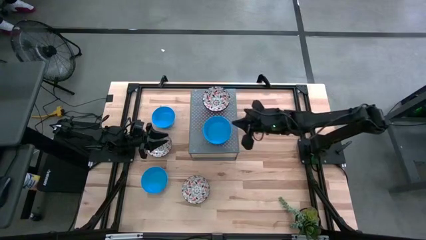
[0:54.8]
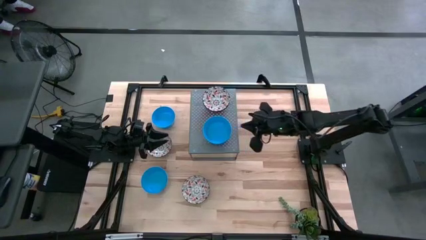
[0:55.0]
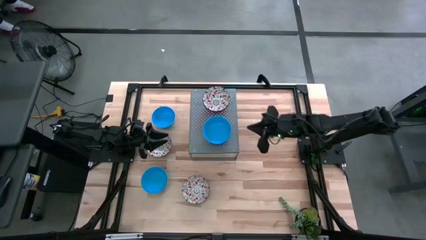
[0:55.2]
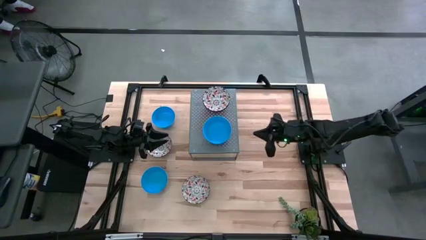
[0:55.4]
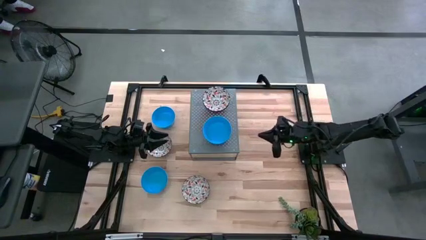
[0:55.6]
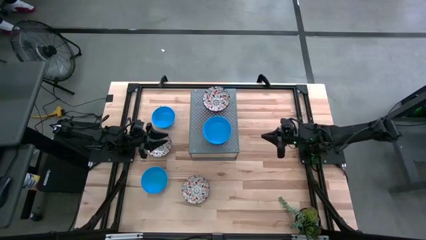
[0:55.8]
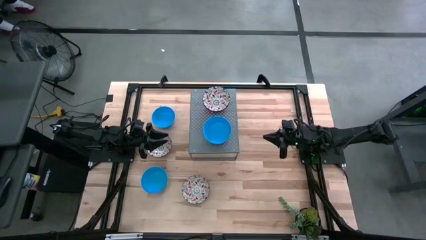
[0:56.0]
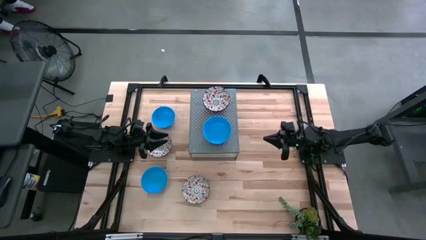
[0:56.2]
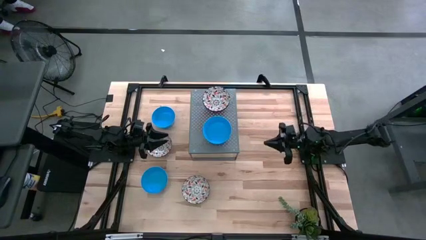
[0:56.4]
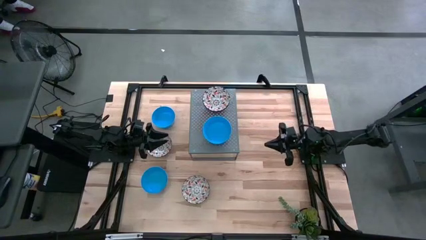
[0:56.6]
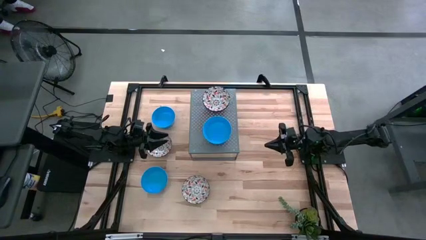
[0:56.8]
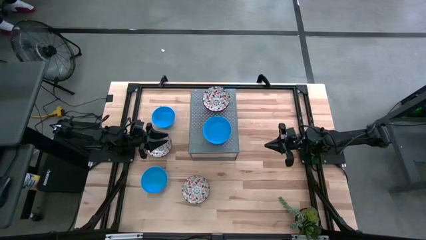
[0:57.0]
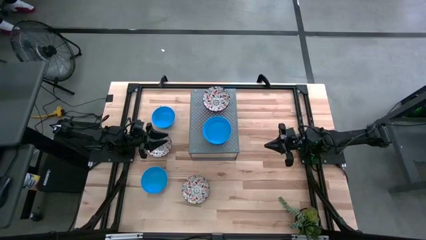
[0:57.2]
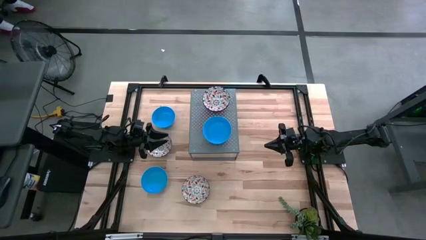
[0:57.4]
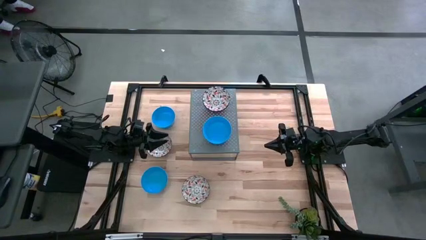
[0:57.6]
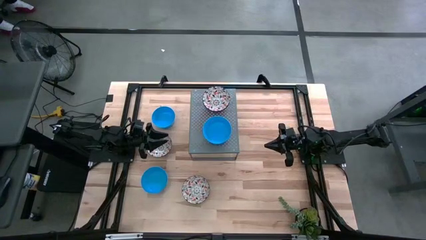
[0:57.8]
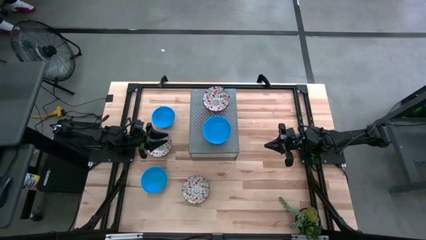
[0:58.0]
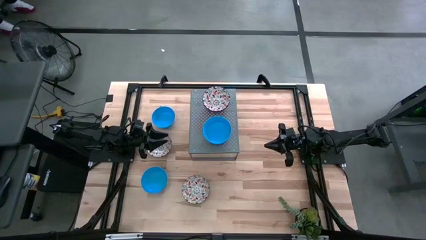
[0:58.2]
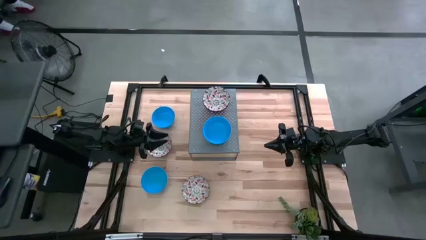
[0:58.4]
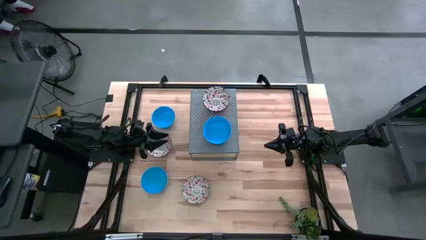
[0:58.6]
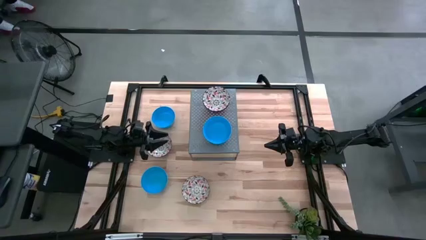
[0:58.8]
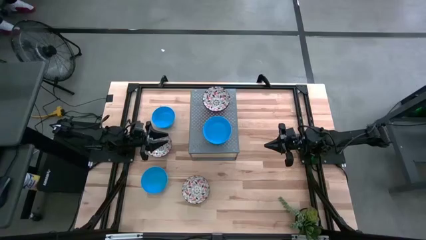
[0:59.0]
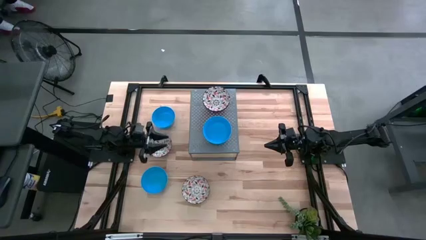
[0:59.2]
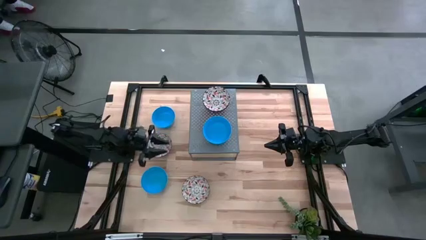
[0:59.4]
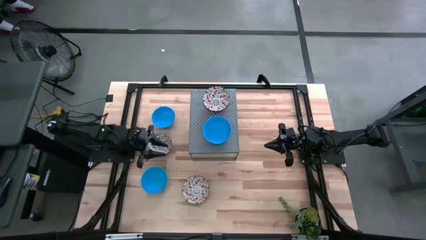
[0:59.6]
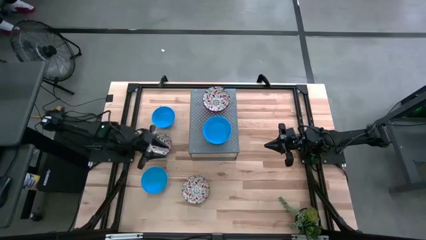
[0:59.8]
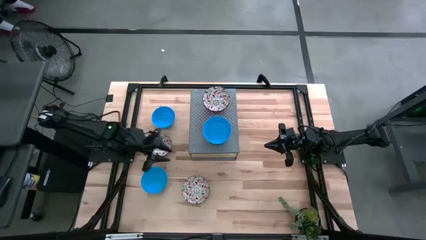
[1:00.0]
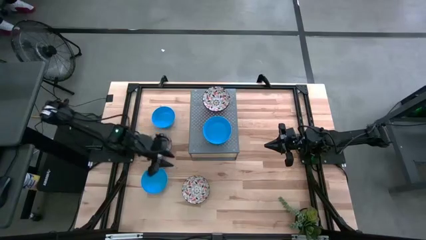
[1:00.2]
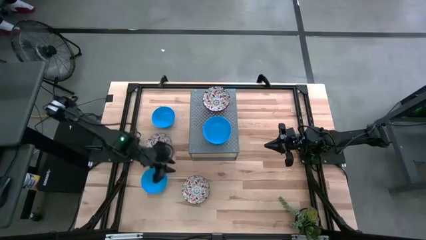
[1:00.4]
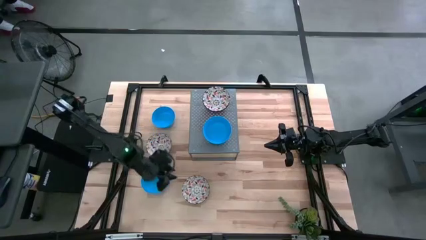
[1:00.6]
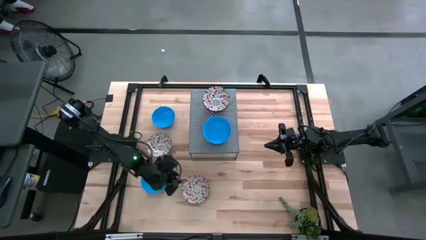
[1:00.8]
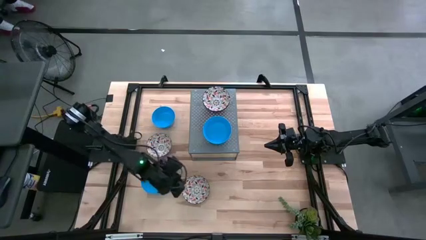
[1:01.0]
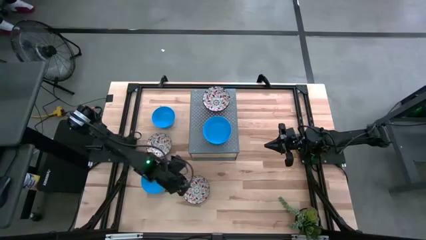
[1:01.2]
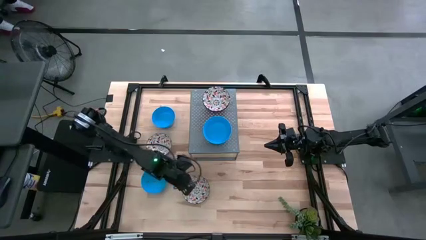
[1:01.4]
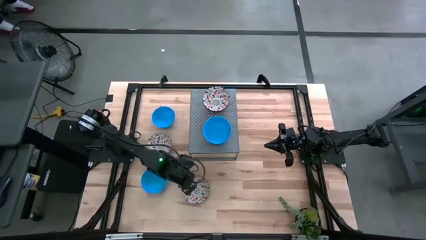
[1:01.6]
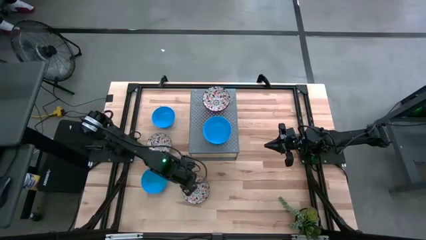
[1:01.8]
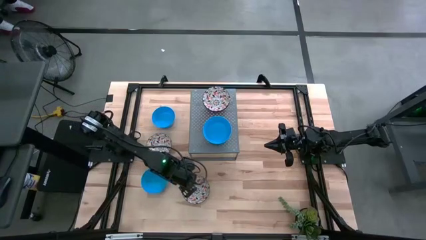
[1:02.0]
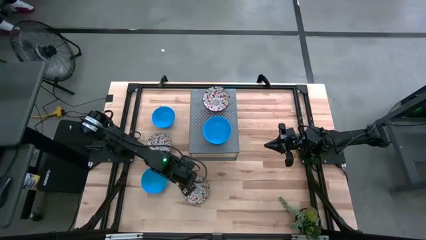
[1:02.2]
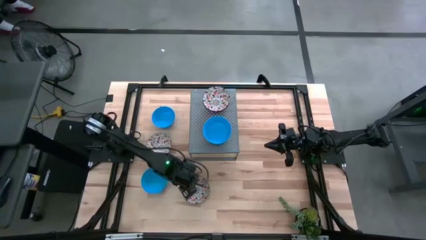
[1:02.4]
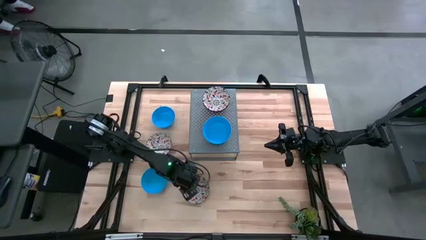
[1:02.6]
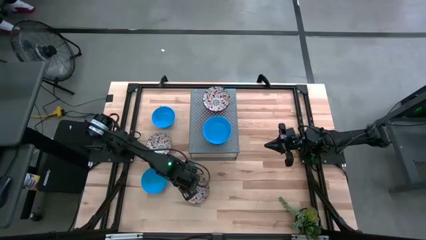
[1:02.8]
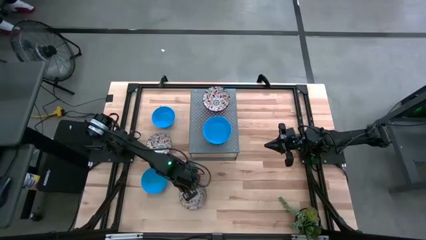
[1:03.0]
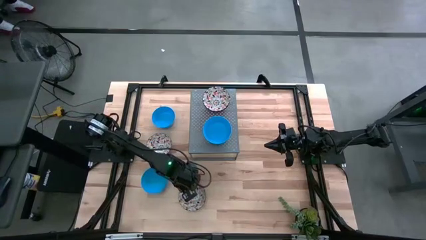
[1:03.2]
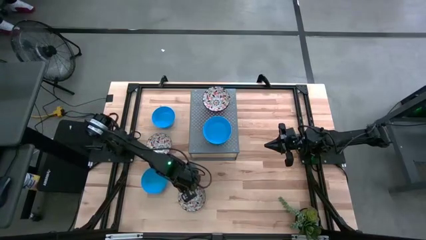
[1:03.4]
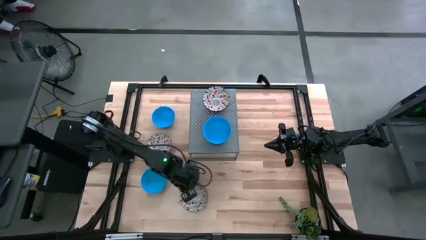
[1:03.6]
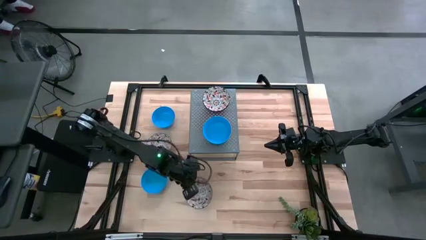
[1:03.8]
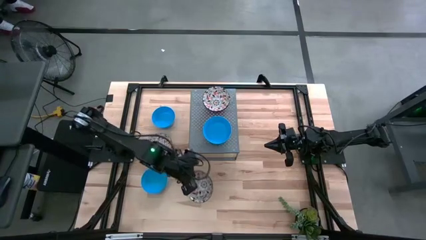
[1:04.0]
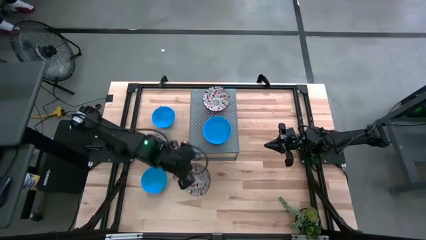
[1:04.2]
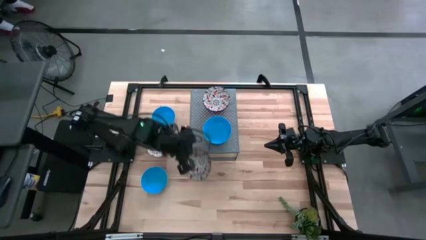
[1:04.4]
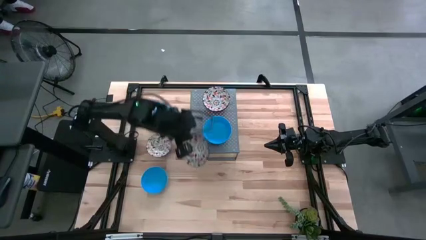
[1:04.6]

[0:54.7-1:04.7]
Task: Pick & Place Mini bowls
Stack the white patterned bowl on the white patterned bowls on the shelf

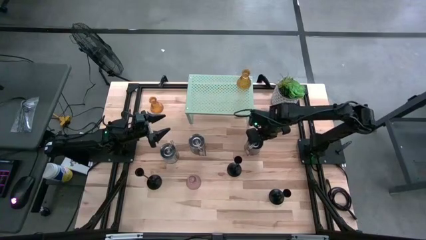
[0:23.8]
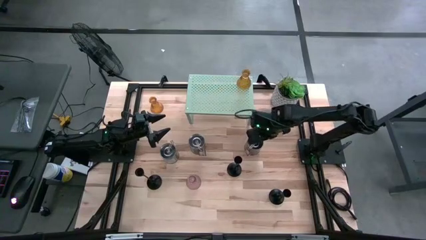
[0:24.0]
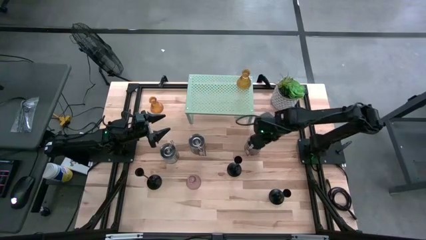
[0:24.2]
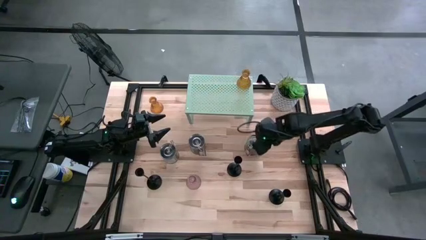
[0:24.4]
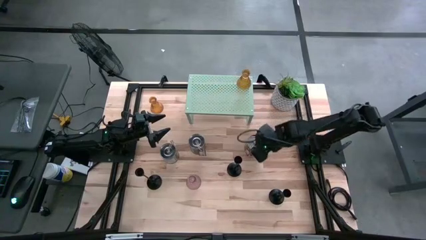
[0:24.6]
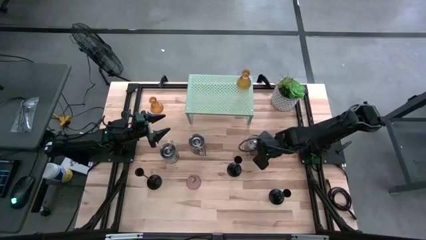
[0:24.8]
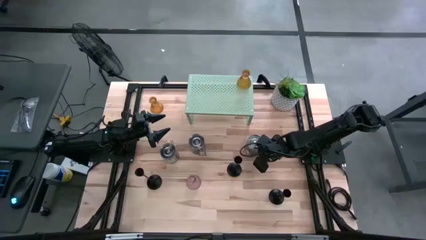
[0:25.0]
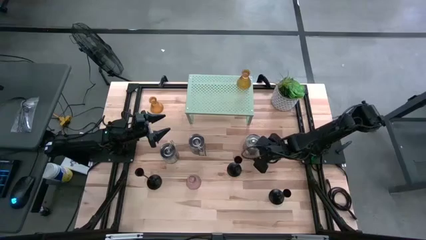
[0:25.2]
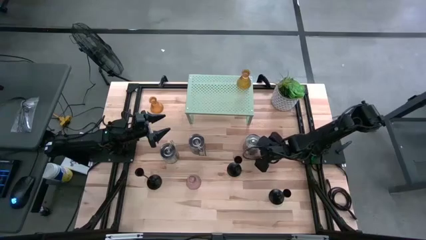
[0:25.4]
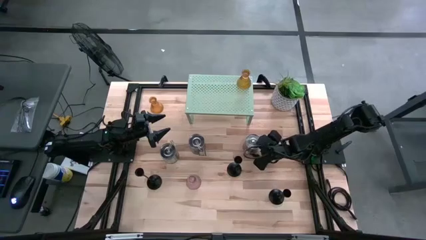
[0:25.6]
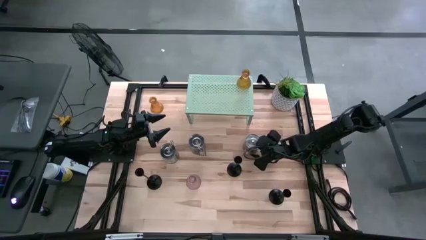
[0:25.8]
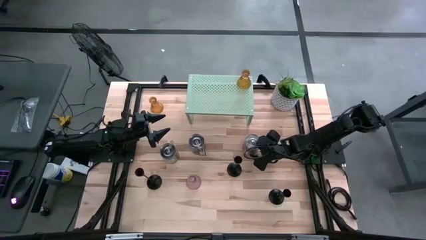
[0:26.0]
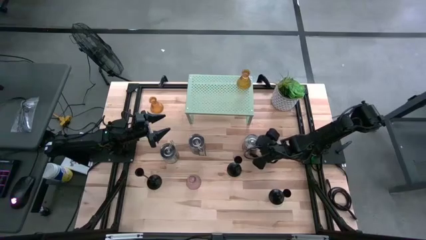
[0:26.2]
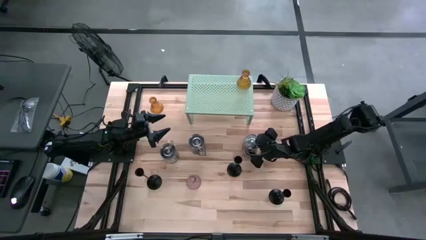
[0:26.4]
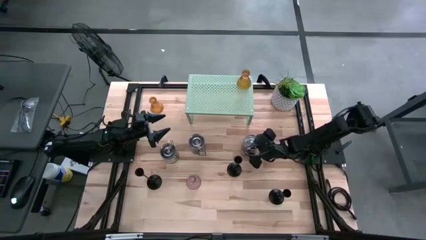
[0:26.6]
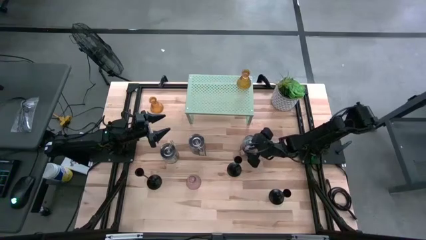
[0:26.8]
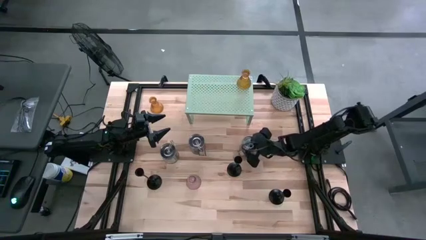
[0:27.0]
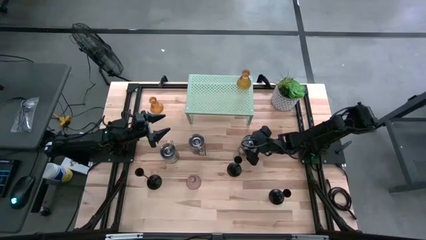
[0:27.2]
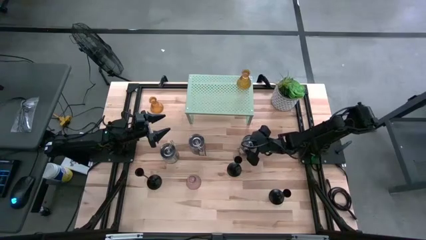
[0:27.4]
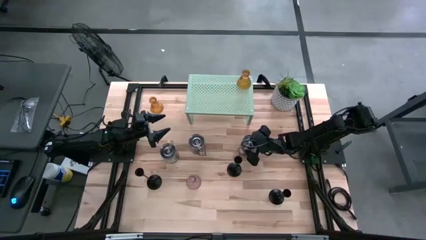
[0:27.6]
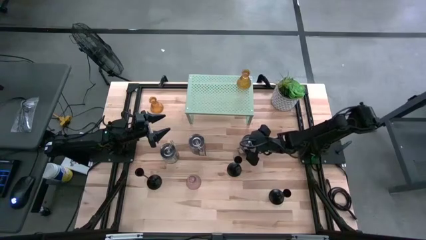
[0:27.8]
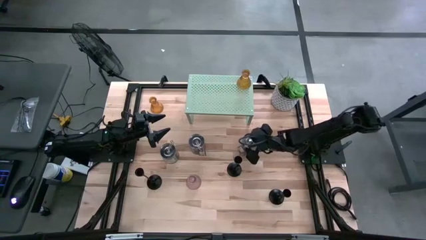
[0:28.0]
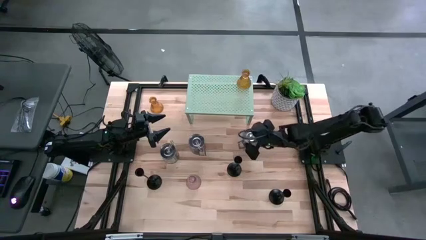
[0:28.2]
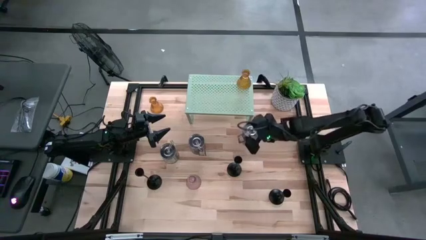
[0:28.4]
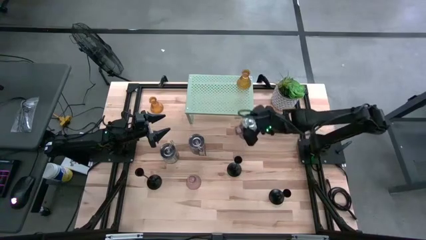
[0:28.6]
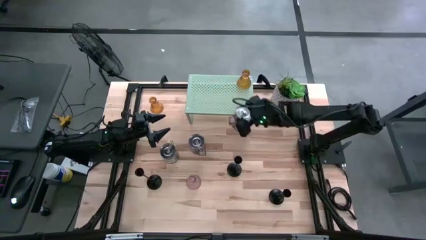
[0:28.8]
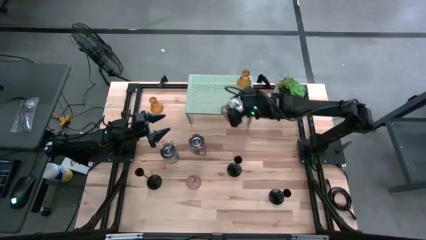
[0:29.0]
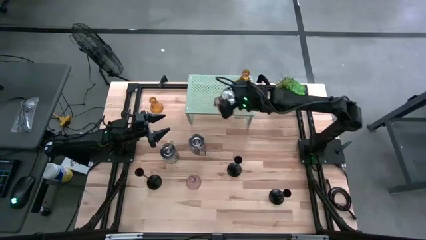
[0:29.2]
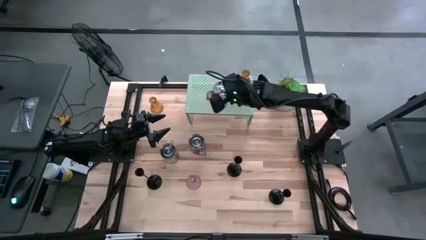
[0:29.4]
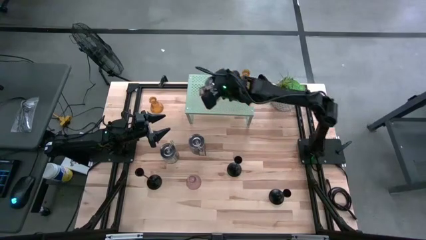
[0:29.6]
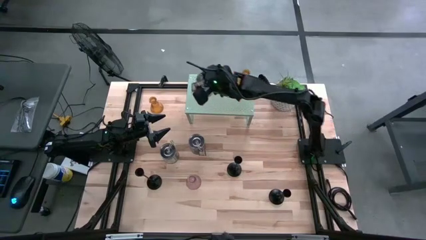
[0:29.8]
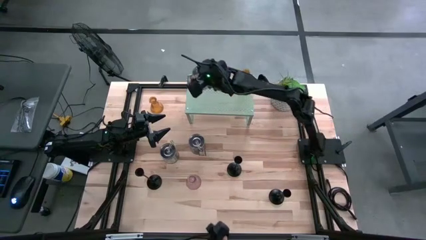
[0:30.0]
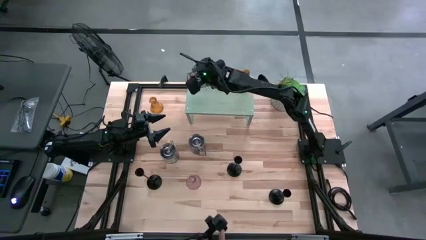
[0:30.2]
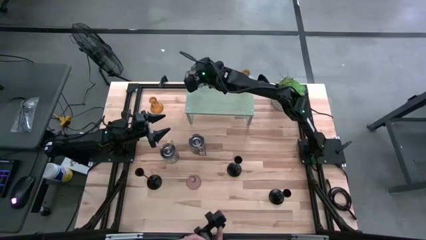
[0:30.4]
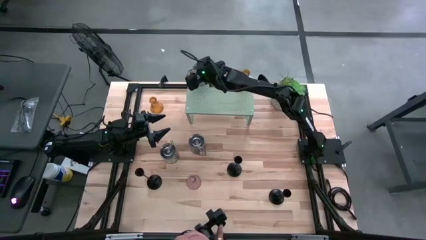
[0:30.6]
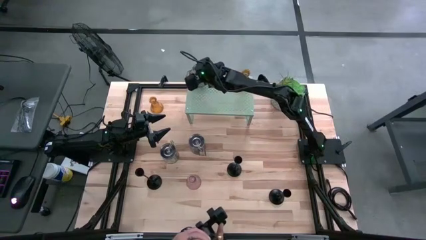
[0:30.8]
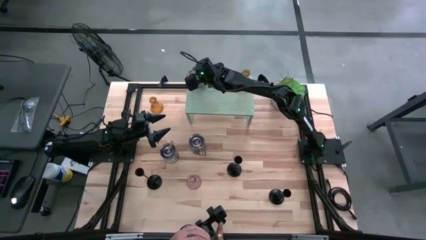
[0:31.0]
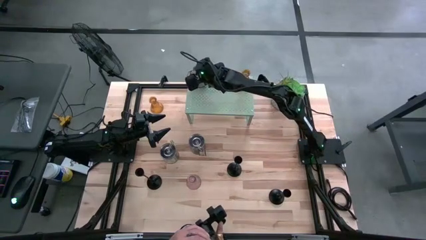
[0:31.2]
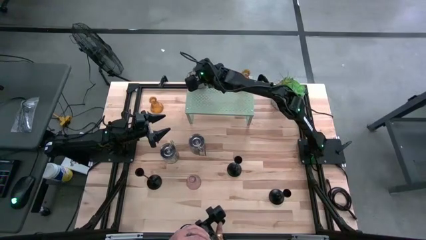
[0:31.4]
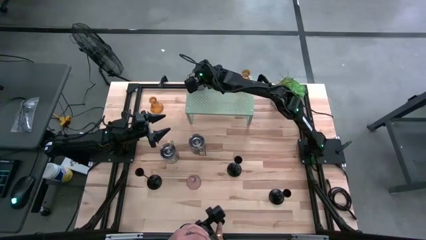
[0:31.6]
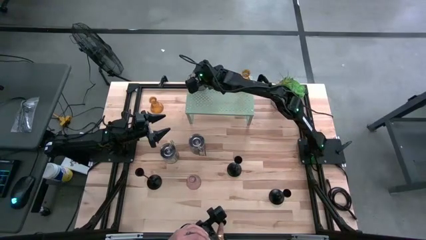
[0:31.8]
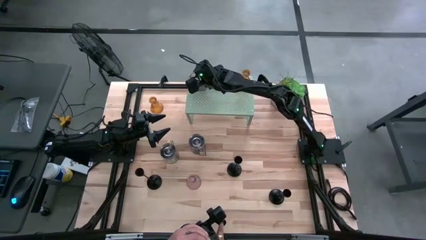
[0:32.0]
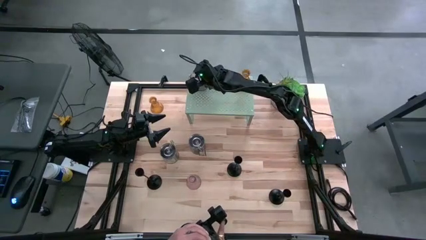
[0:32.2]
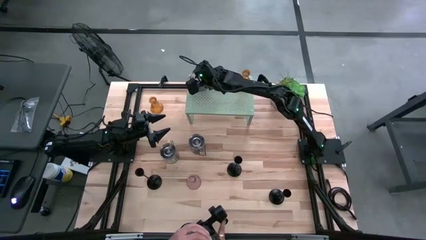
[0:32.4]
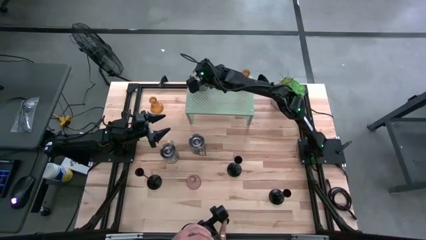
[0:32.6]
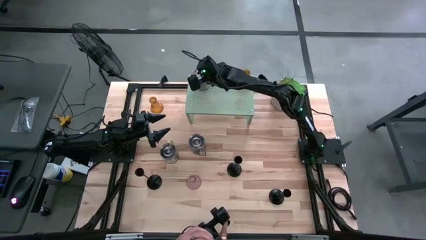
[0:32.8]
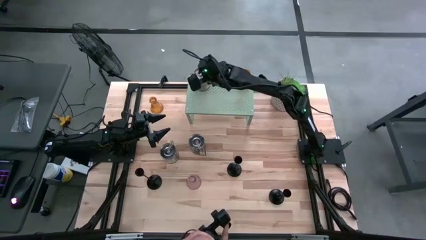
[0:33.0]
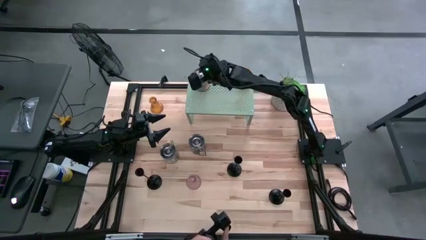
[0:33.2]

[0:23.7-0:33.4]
Task: Pick & Place candle stick holders
Put the orange scented candle on the shelf
